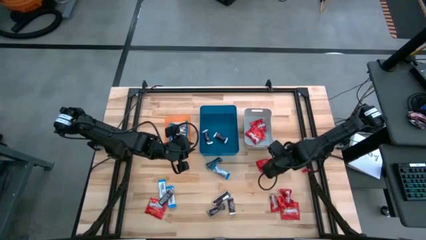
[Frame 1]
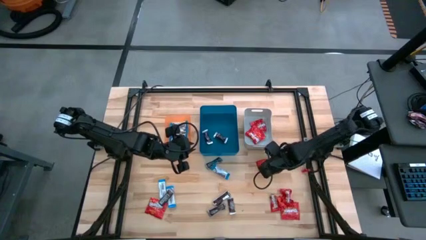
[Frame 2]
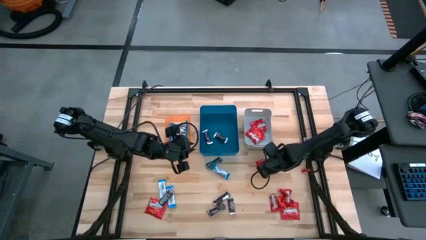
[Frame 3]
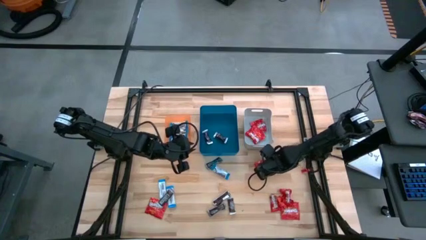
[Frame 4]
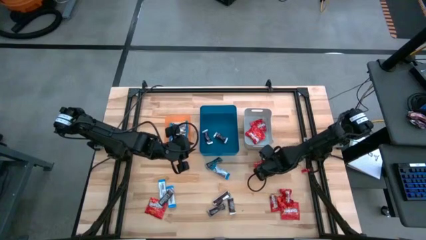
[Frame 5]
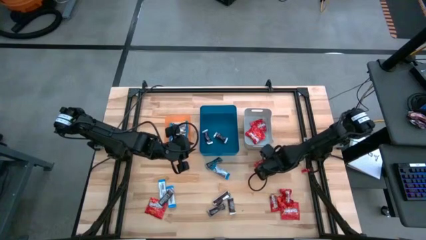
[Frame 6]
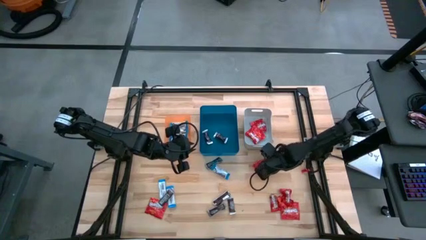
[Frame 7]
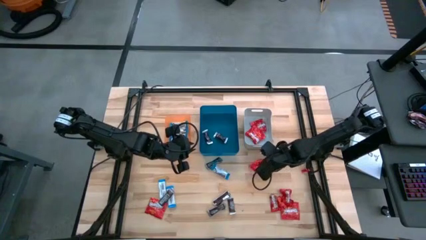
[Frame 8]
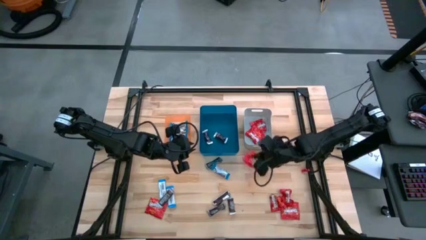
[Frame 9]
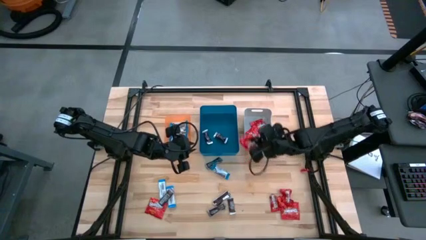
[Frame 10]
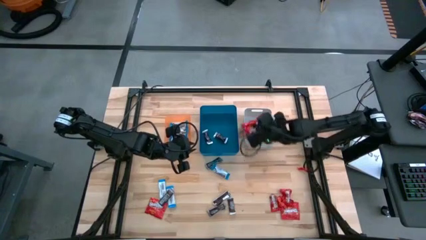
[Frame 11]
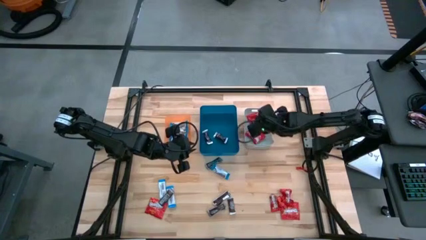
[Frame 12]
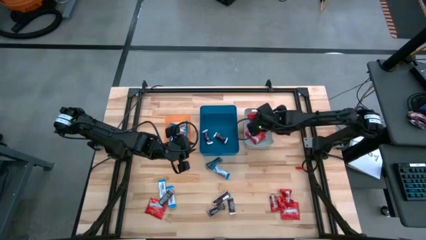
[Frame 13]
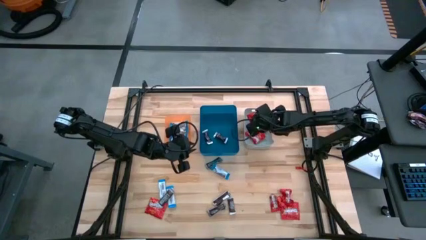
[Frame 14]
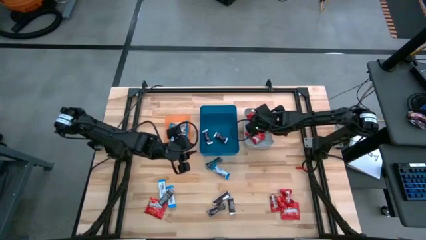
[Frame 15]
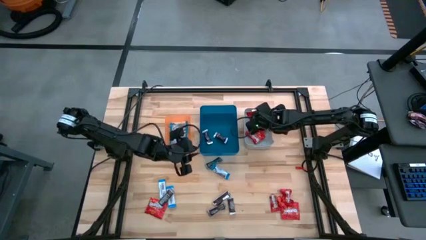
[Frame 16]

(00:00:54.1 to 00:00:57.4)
Task: Sort candy
Put the red candy into the gray bin

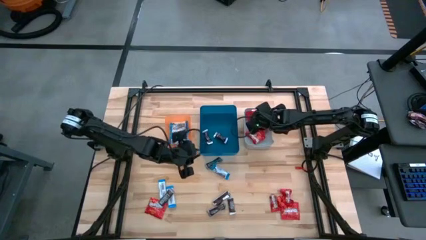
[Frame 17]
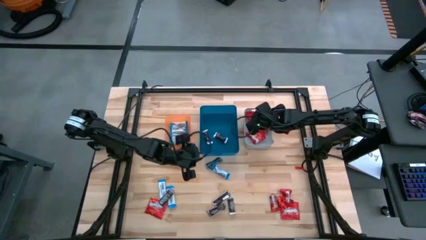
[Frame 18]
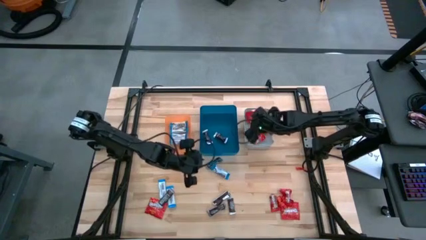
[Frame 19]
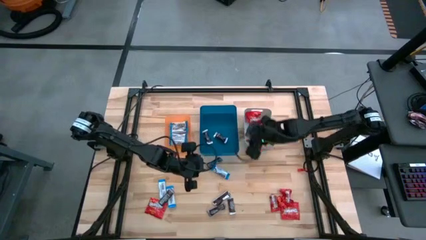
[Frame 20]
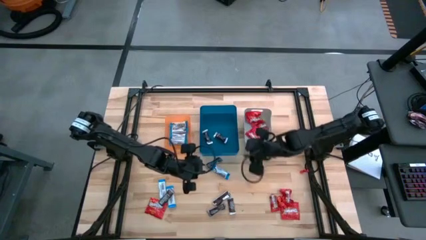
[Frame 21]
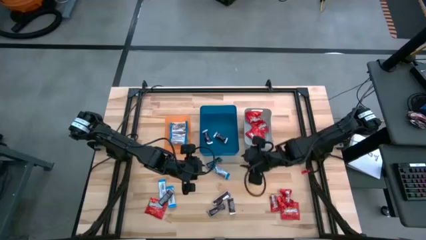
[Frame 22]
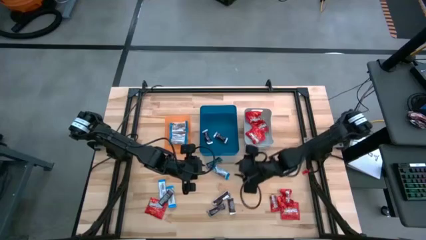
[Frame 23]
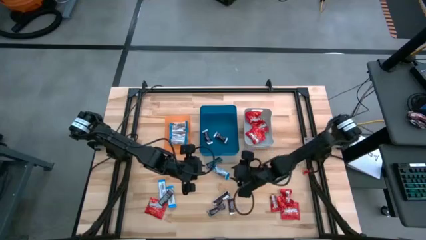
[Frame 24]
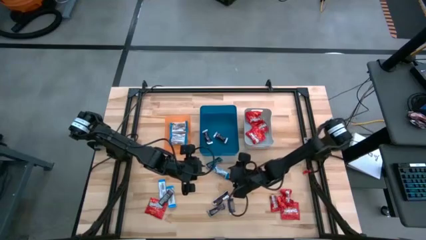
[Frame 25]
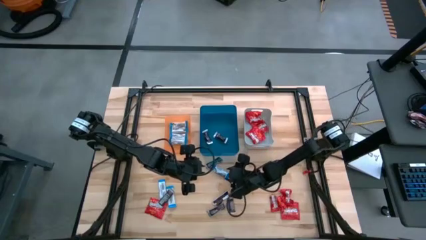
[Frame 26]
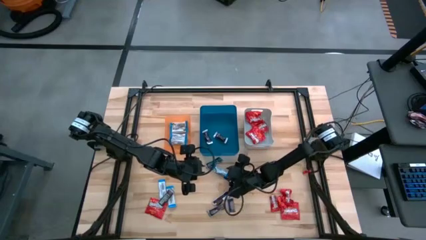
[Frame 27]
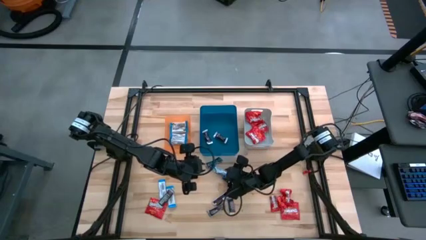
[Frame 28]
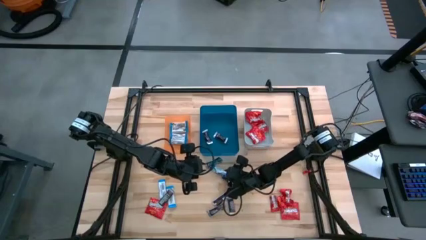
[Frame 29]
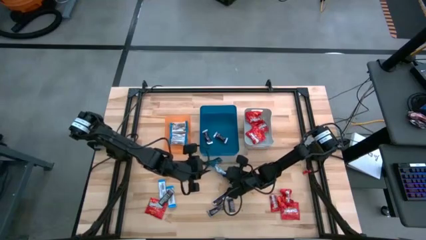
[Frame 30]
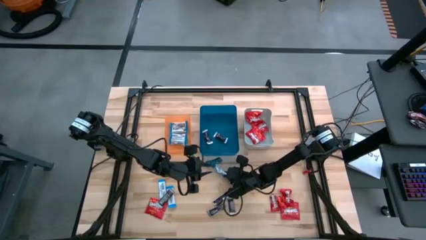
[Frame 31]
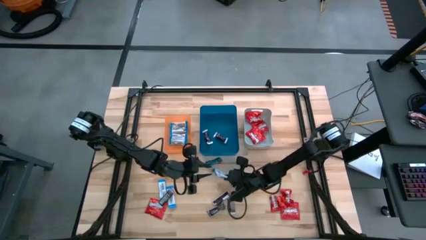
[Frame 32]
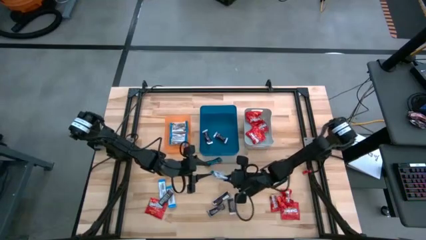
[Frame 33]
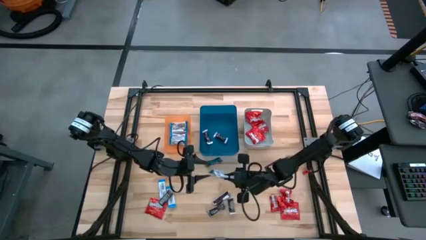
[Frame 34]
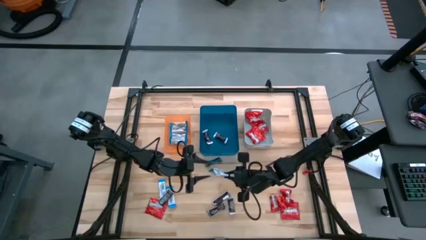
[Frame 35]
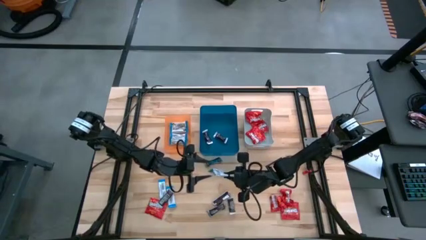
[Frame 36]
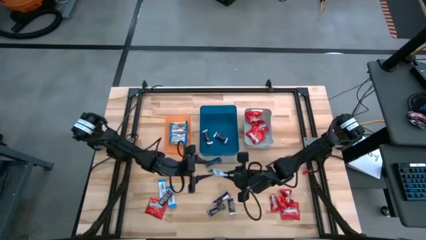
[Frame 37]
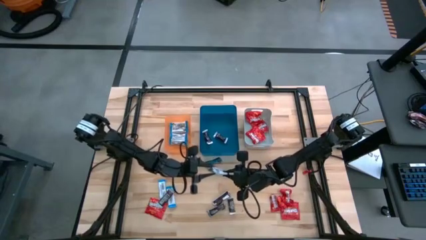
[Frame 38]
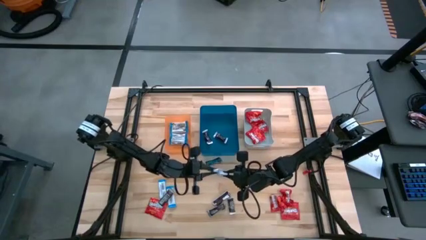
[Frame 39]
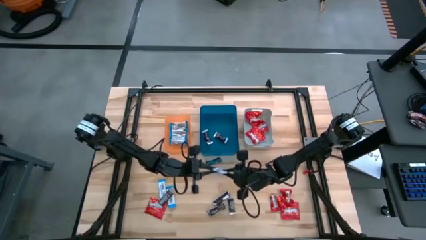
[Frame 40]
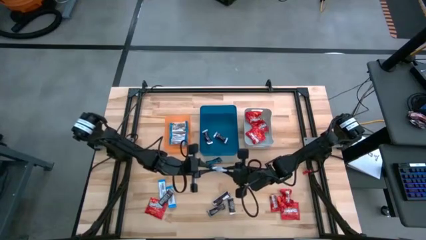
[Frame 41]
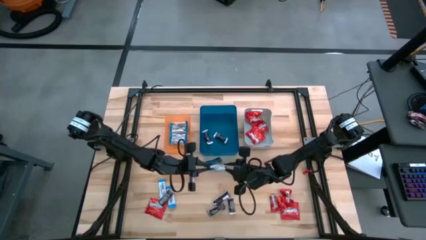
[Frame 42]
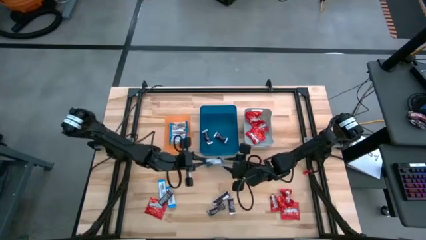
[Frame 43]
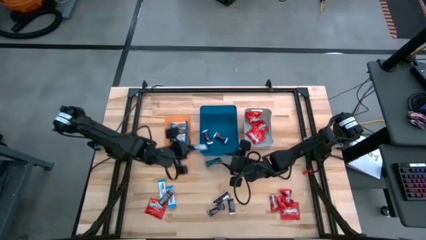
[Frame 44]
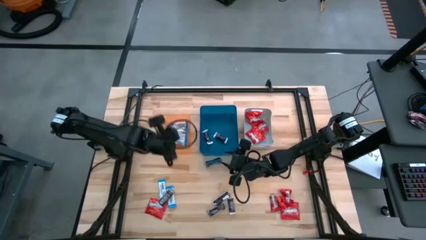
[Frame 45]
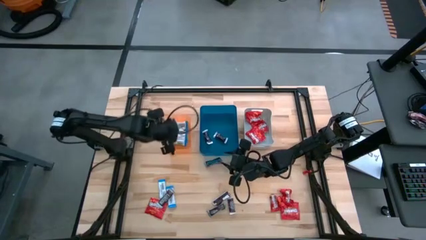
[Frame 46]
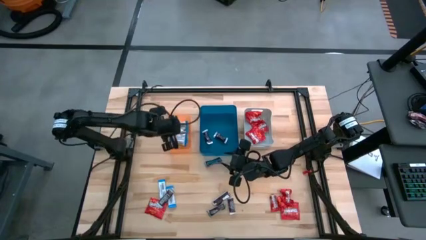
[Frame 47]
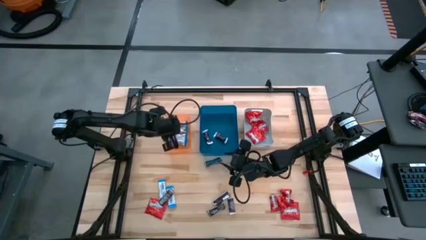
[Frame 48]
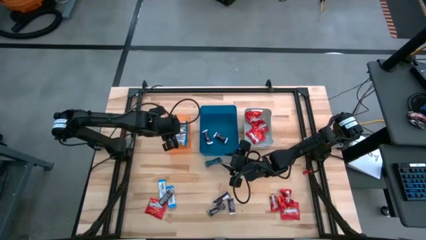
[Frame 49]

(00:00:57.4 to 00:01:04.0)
Put the white chocolate bar into the orange bin

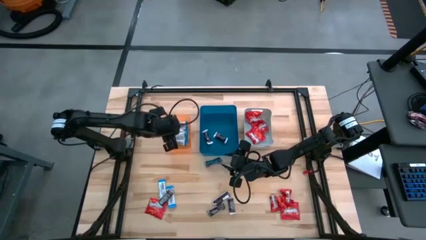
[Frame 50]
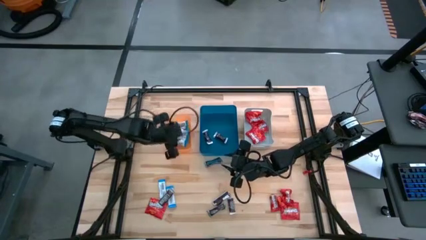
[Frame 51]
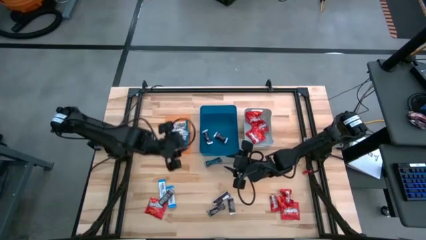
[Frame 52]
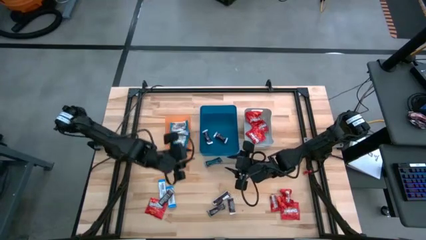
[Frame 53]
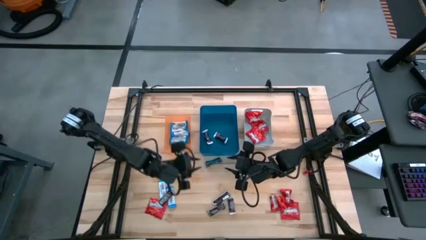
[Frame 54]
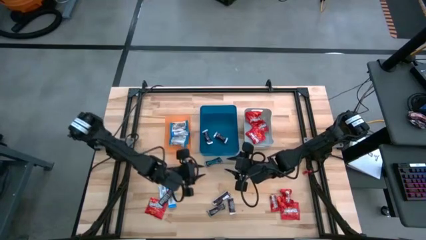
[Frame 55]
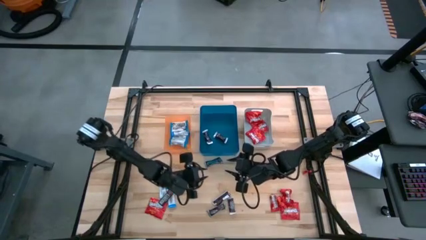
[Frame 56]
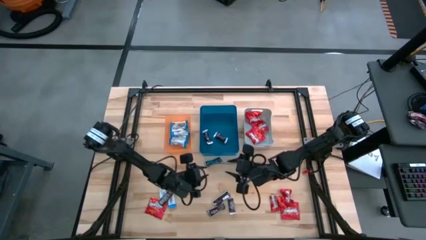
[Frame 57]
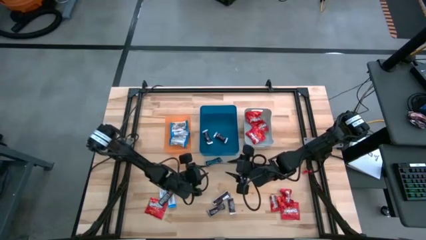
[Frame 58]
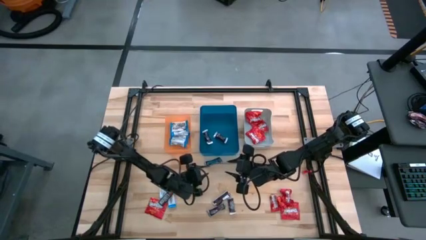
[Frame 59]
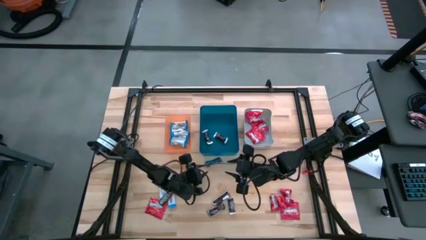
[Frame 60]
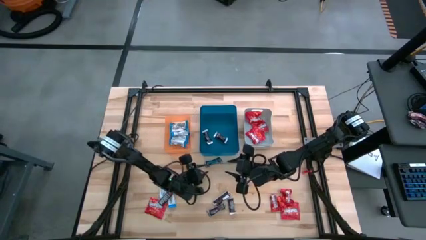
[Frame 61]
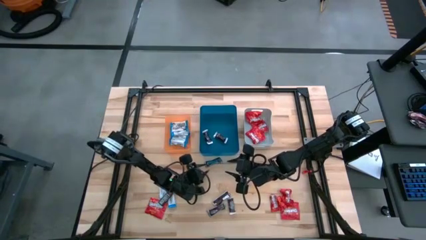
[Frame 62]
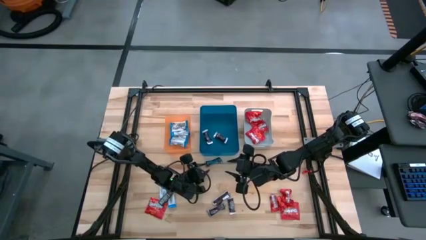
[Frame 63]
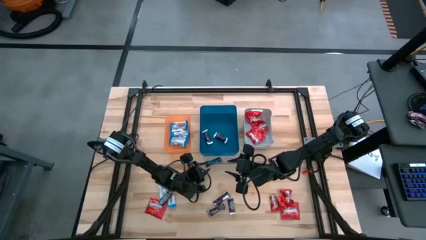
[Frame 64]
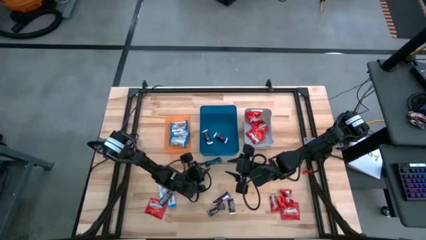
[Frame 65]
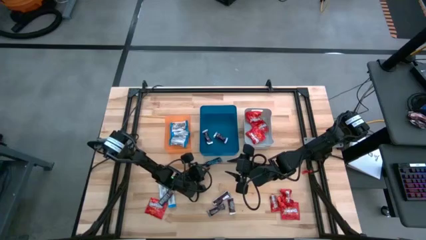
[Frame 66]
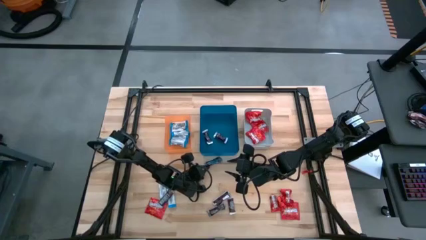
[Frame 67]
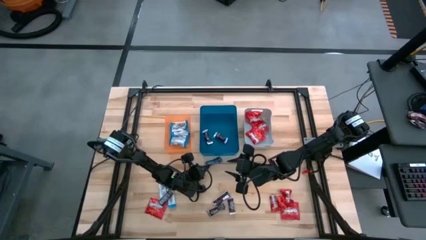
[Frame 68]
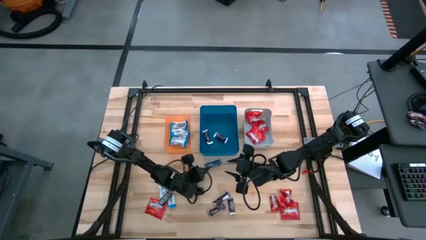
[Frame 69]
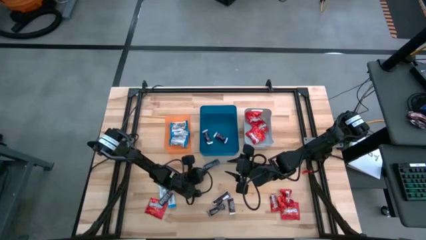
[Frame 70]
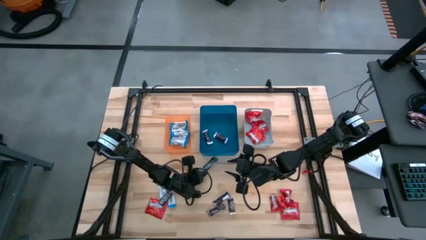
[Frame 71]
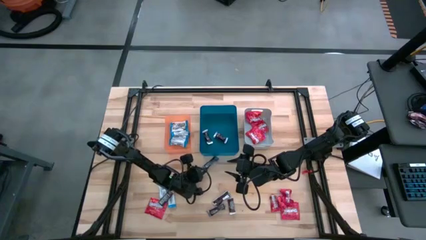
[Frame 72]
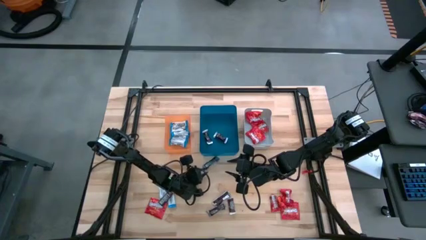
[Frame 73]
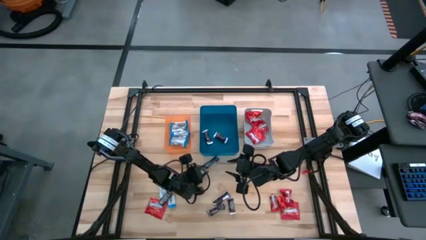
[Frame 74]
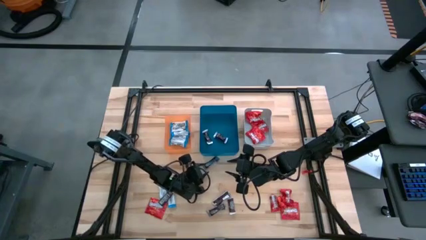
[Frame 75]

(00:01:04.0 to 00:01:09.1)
Put the brown chocolate bar into the blue bin

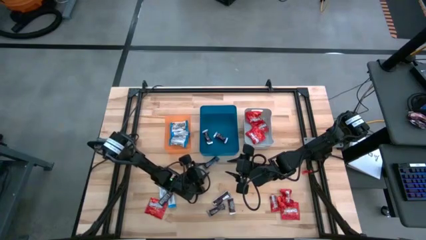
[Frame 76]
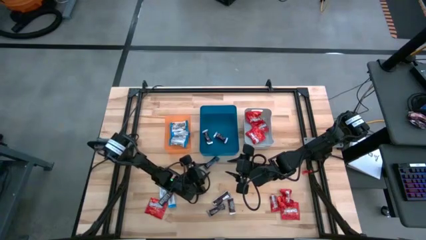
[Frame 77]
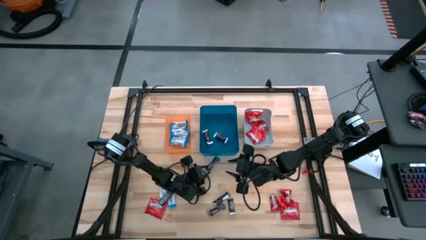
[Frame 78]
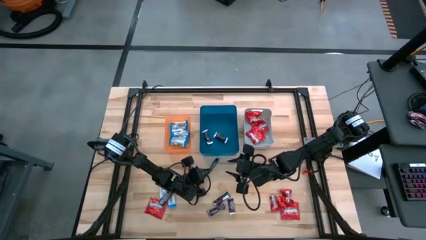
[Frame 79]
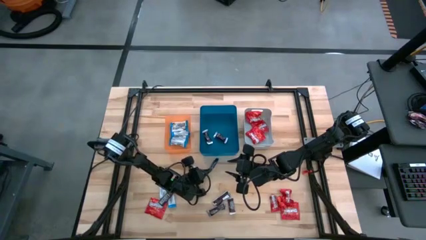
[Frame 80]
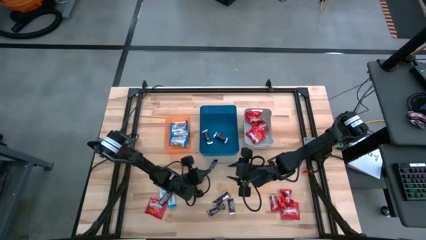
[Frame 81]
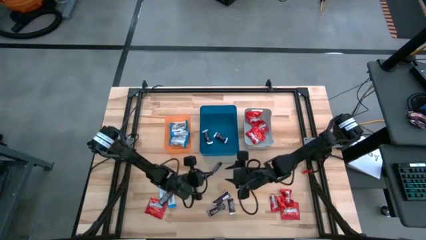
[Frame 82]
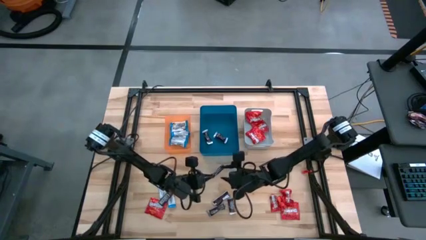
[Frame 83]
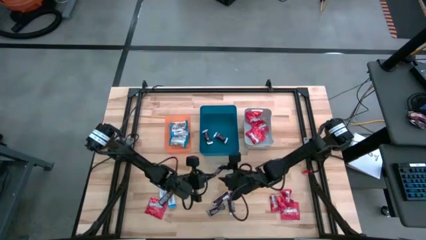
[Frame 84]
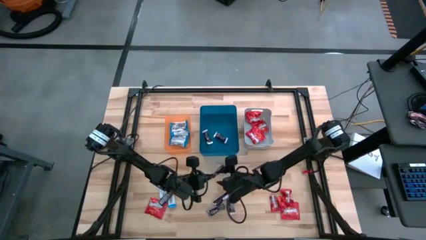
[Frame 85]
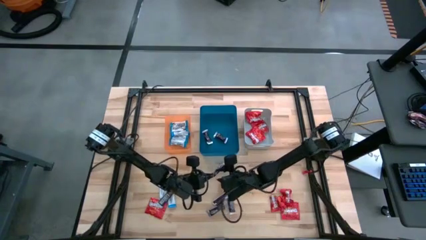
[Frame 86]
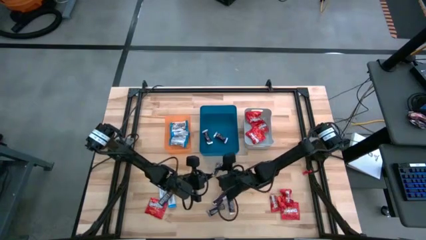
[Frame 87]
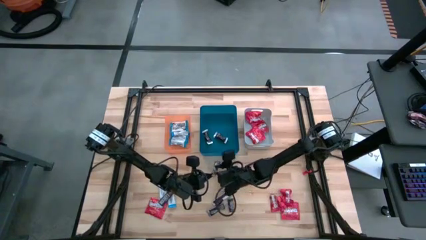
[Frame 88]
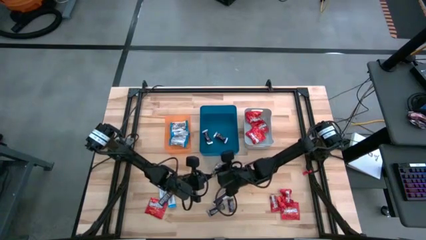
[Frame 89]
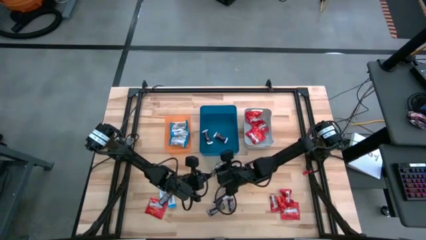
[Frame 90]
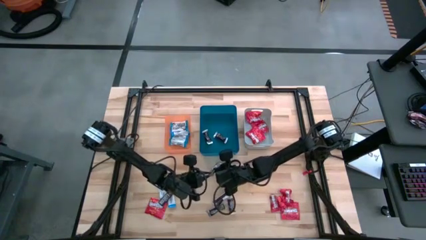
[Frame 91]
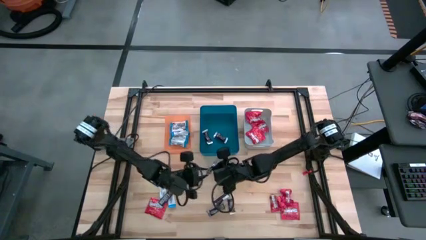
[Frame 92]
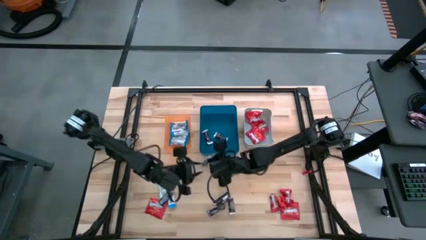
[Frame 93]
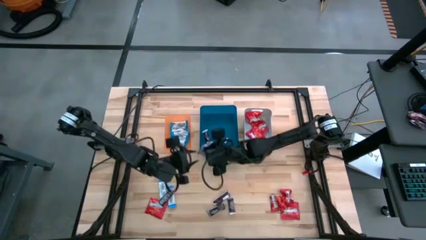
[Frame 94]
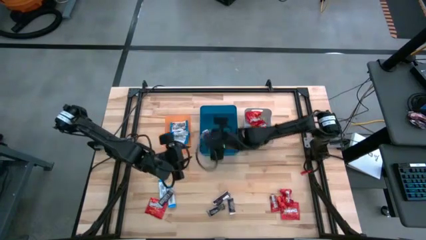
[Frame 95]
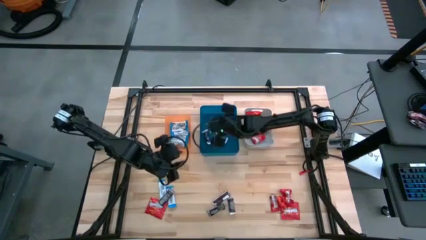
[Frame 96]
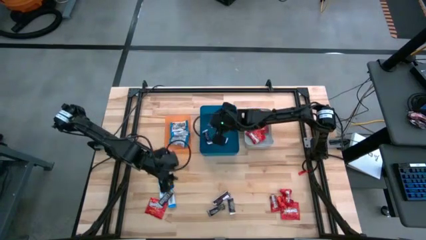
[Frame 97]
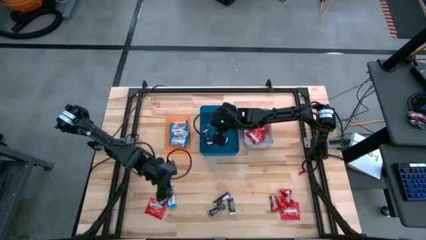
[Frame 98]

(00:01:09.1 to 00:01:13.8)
Put the brown chocolate bar into the blue bin
